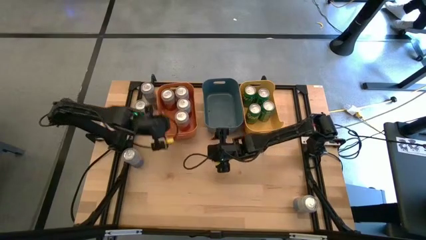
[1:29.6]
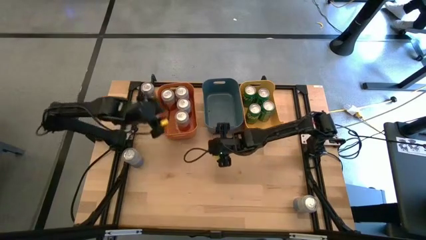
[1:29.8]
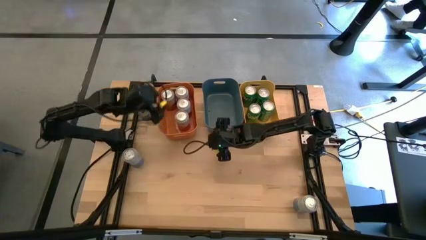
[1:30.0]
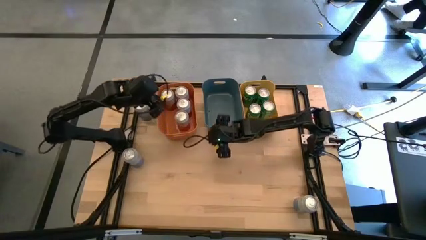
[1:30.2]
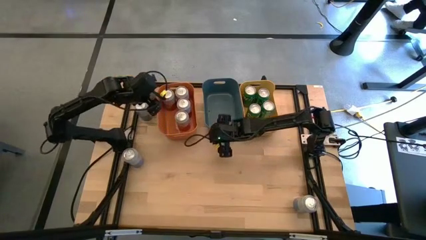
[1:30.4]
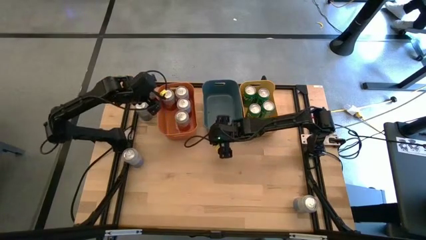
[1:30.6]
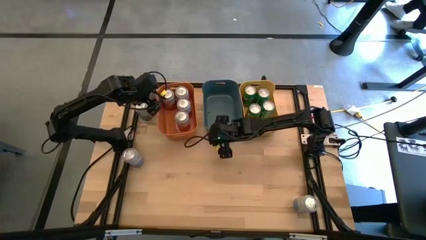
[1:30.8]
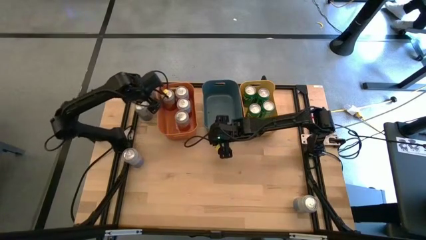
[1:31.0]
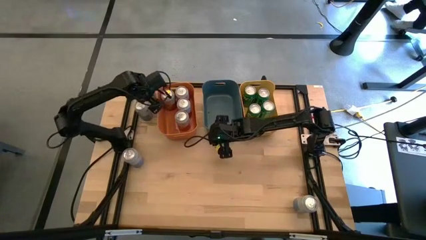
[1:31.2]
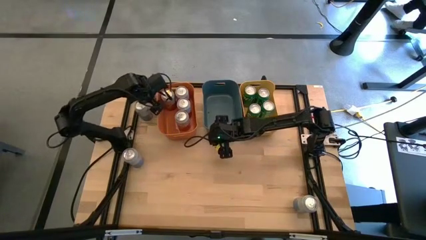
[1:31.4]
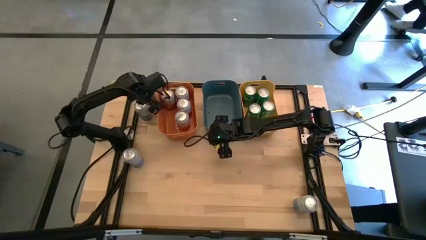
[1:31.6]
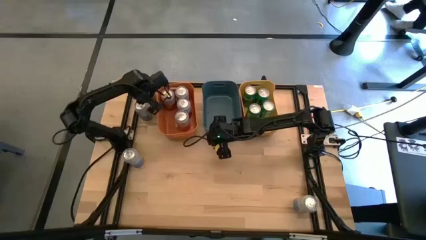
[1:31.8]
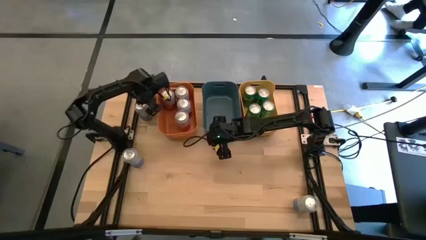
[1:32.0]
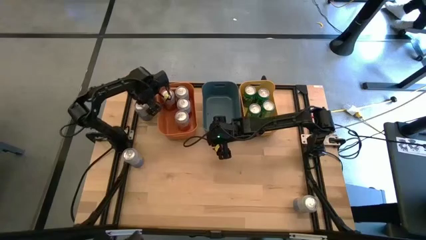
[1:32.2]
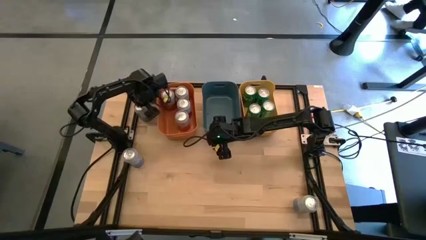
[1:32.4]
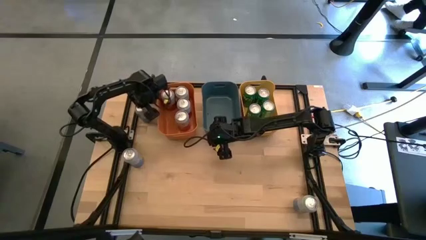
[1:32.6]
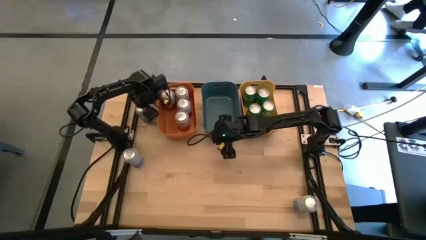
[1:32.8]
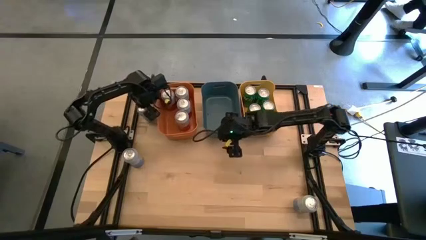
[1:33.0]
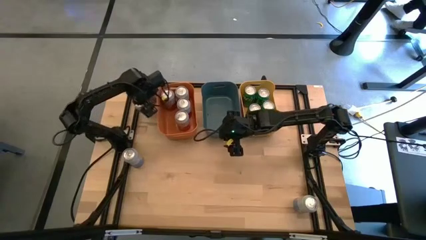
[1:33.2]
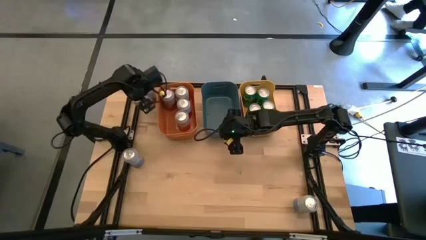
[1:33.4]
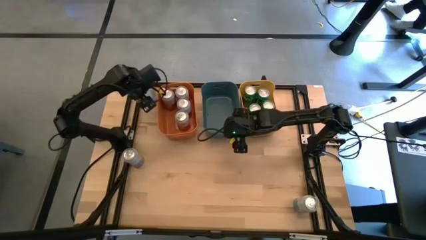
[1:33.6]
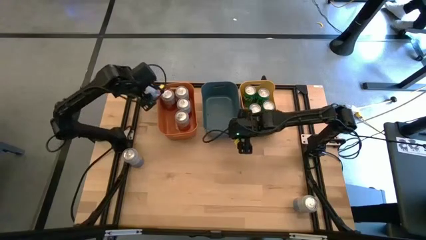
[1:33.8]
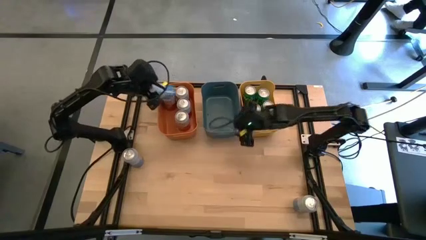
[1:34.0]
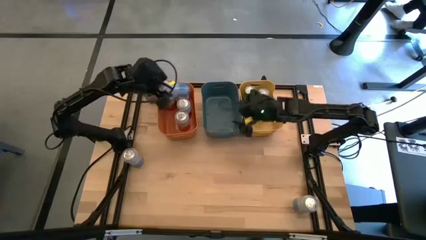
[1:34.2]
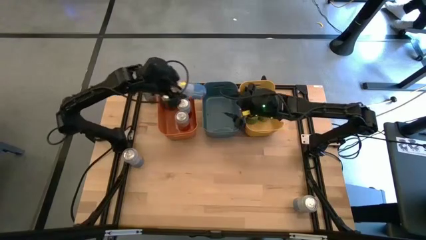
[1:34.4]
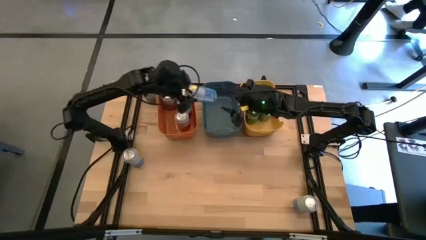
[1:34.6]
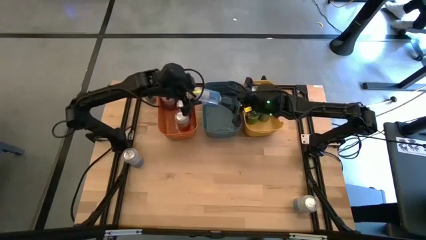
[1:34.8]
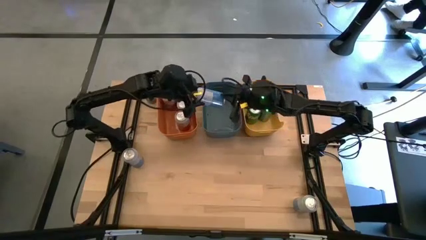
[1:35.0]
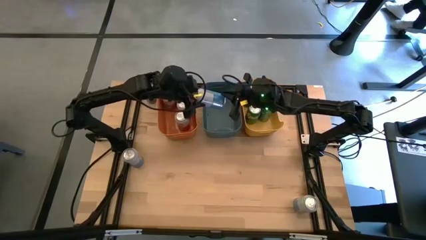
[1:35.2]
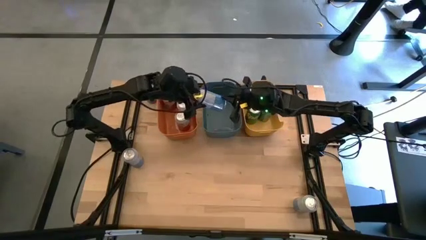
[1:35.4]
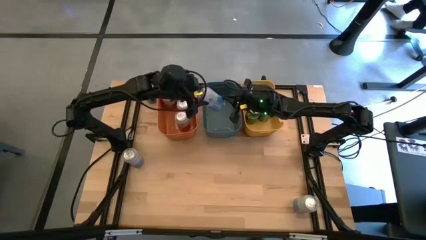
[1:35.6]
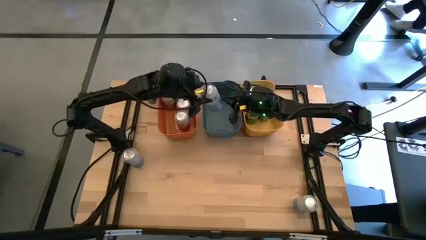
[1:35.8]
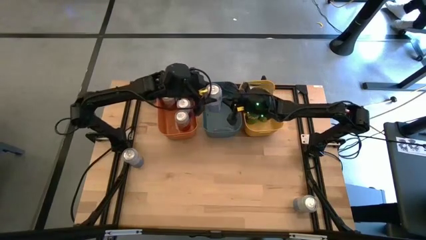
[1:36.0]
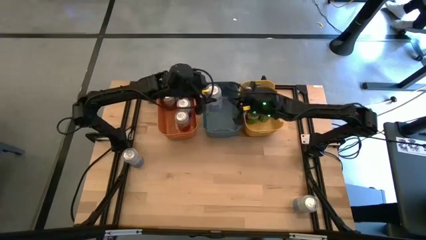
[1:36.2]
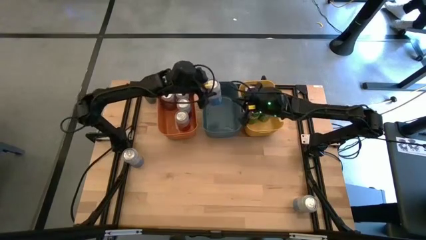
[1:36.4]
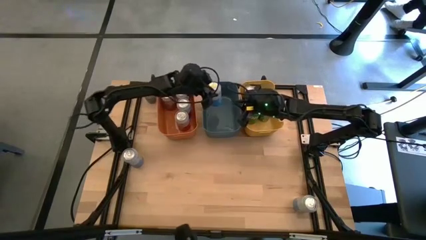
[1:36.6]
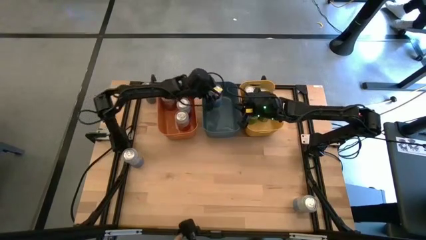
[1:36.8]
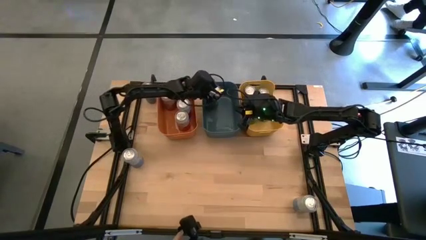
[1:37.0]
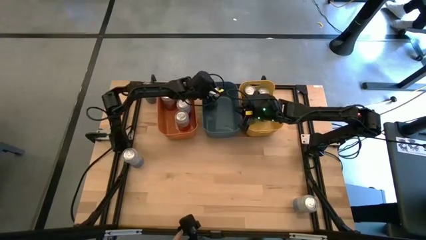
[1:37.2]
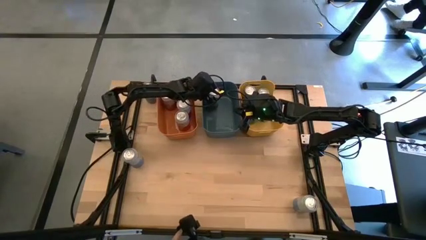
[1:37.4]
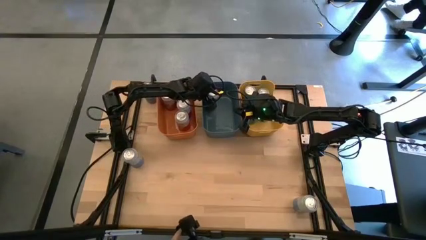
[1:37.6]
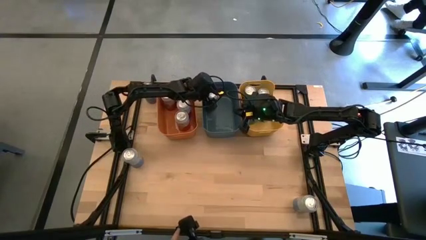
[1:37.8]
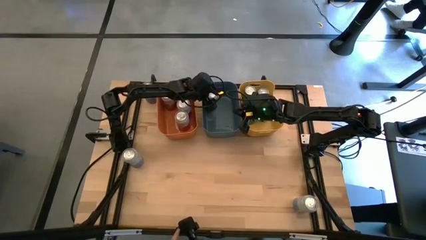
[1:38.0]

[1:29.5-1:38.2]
Task: Sort soda cans
Put the blue-white soda can into the blue bin
